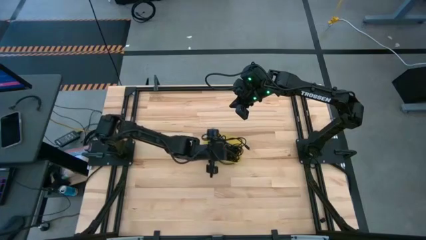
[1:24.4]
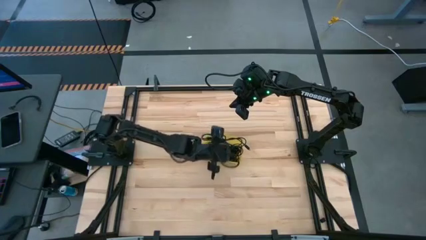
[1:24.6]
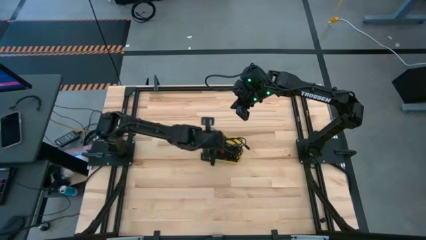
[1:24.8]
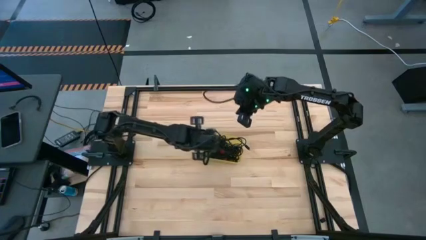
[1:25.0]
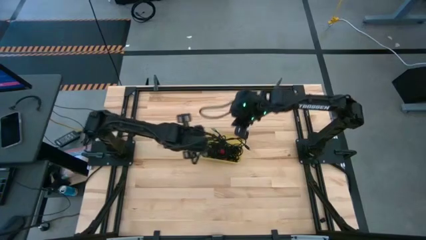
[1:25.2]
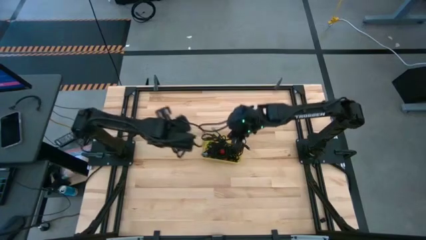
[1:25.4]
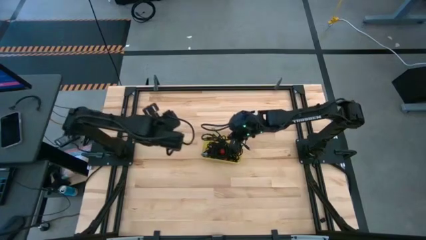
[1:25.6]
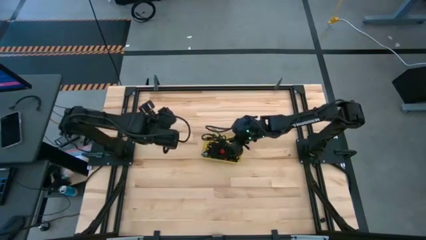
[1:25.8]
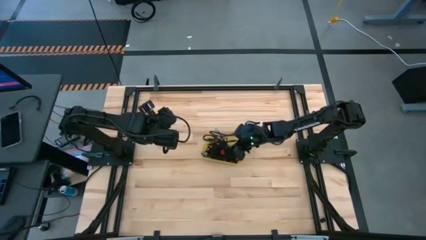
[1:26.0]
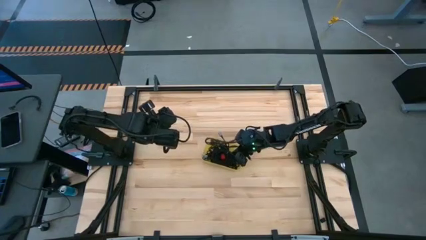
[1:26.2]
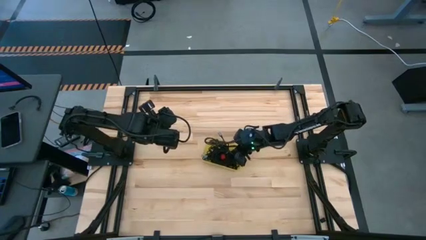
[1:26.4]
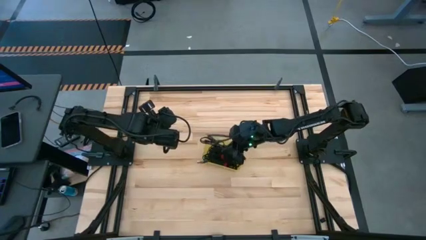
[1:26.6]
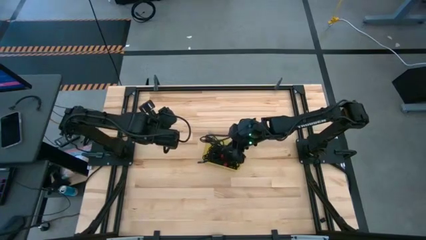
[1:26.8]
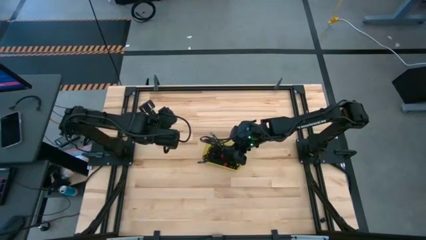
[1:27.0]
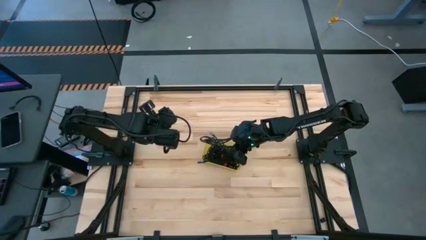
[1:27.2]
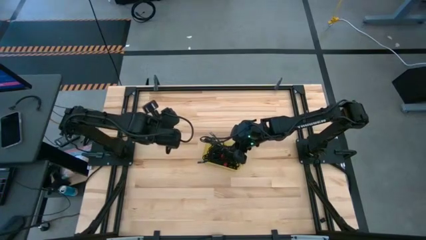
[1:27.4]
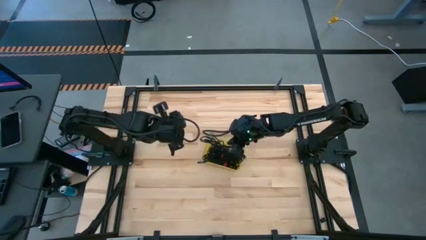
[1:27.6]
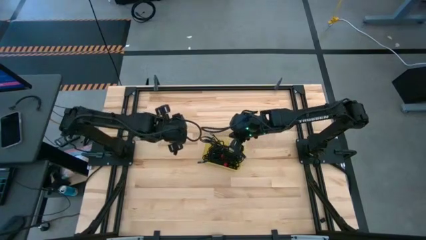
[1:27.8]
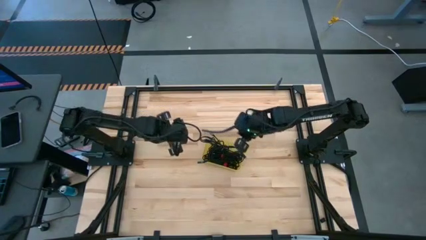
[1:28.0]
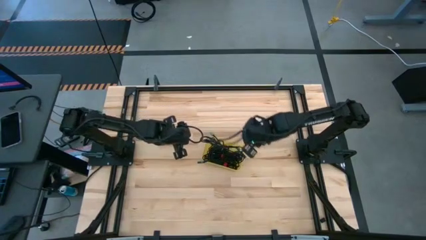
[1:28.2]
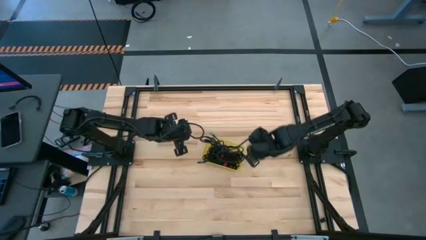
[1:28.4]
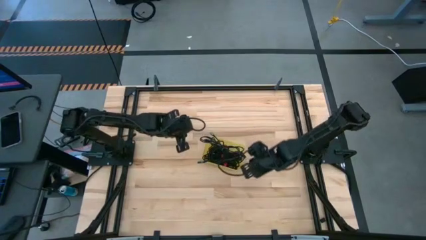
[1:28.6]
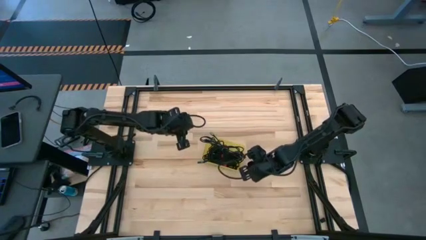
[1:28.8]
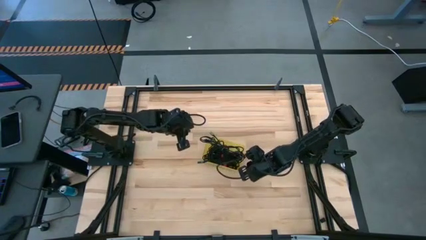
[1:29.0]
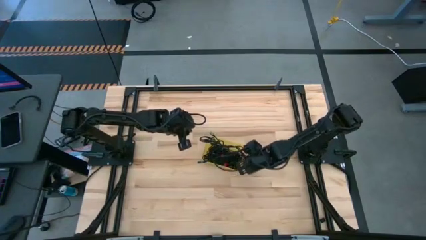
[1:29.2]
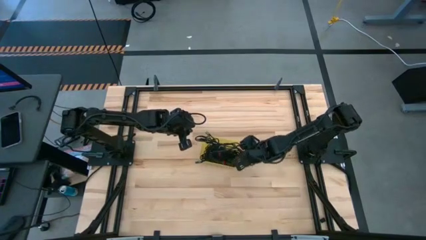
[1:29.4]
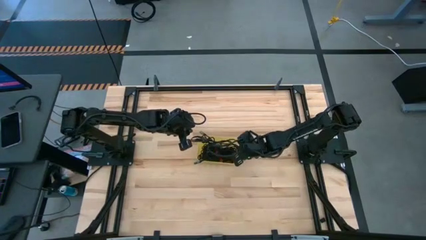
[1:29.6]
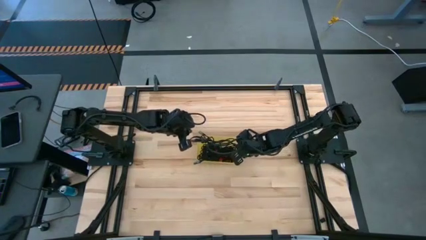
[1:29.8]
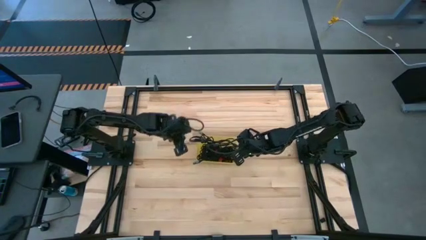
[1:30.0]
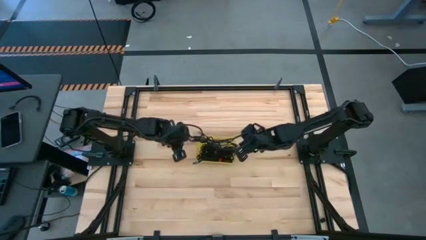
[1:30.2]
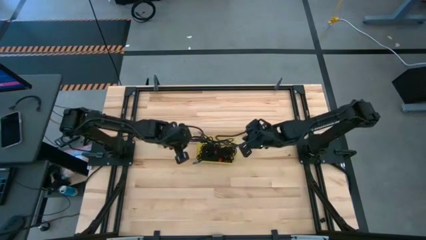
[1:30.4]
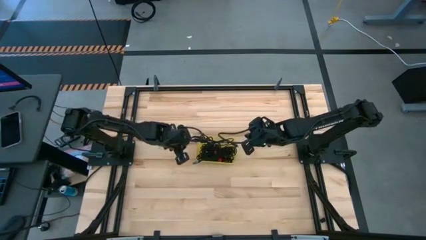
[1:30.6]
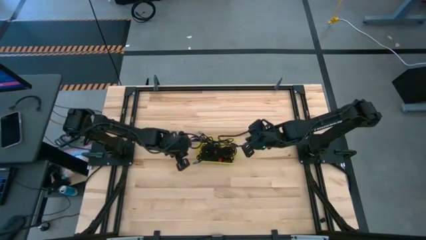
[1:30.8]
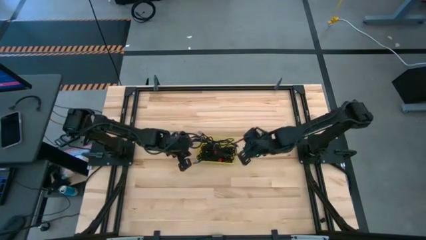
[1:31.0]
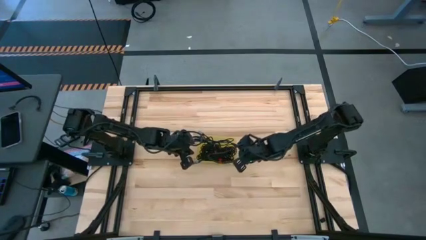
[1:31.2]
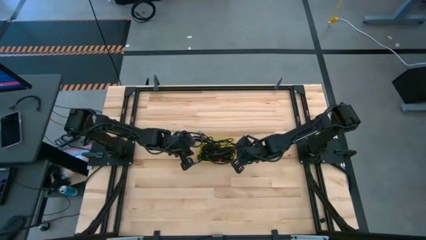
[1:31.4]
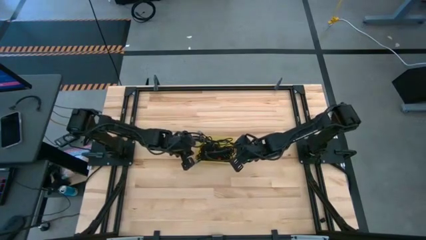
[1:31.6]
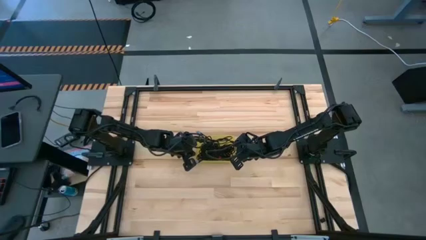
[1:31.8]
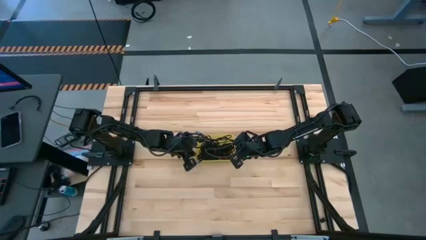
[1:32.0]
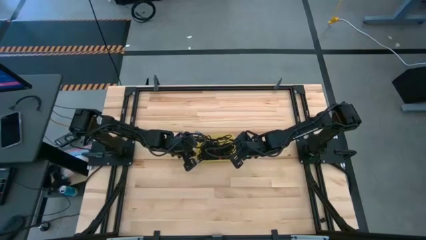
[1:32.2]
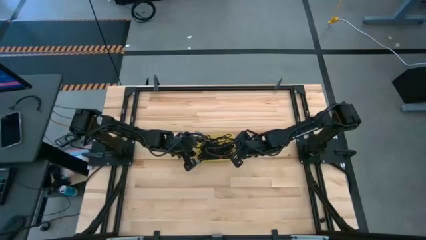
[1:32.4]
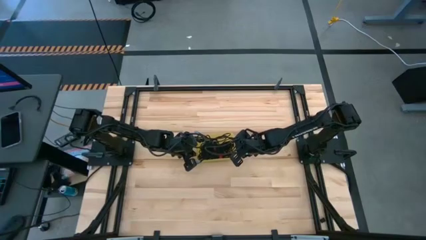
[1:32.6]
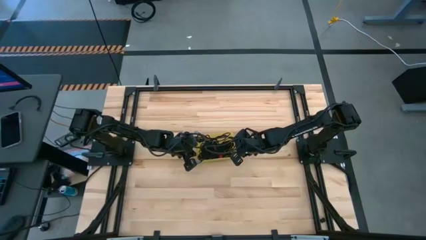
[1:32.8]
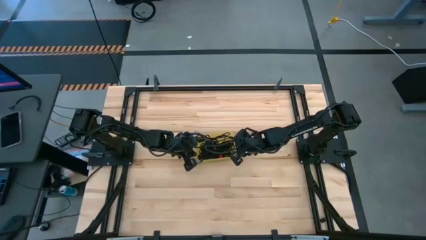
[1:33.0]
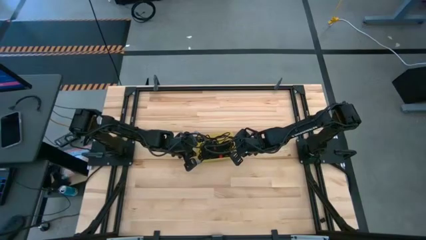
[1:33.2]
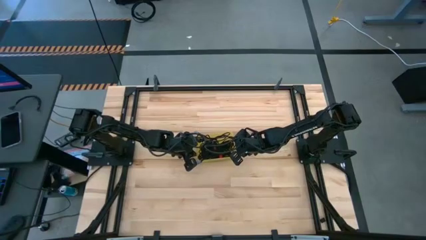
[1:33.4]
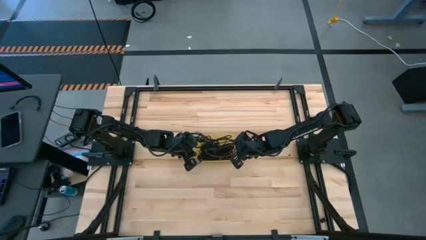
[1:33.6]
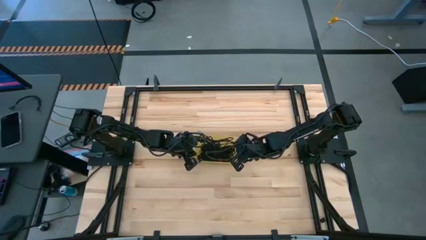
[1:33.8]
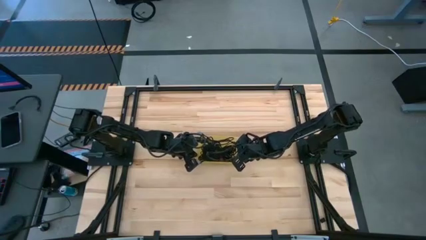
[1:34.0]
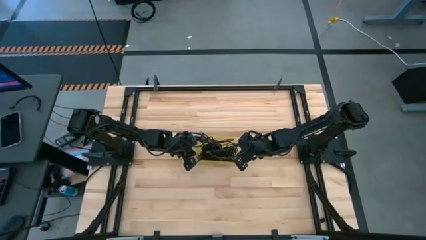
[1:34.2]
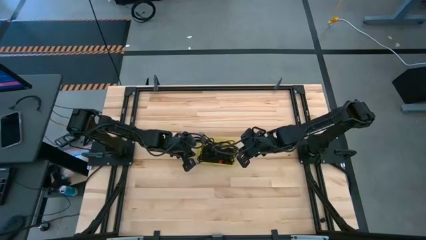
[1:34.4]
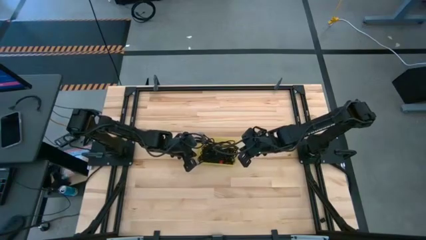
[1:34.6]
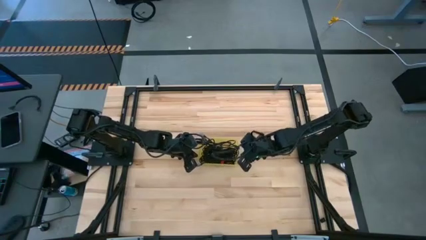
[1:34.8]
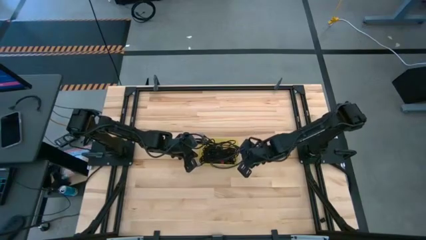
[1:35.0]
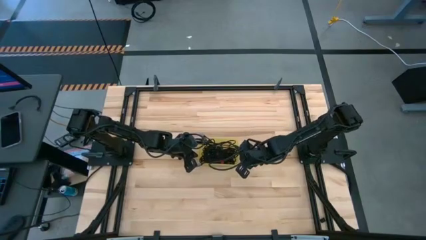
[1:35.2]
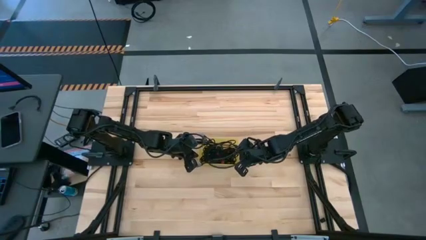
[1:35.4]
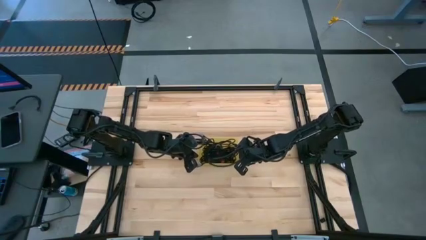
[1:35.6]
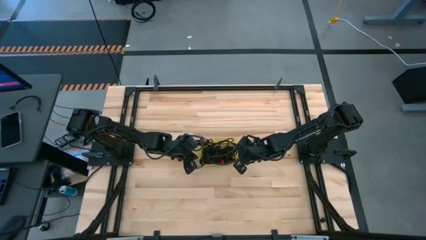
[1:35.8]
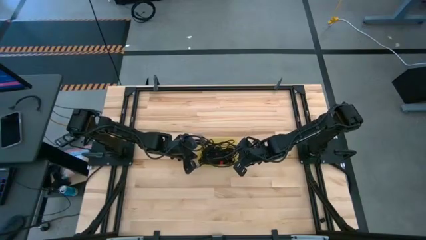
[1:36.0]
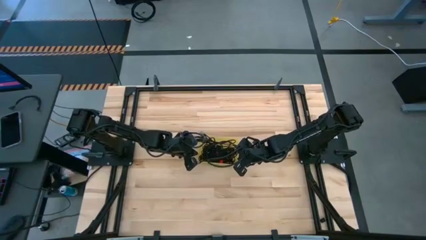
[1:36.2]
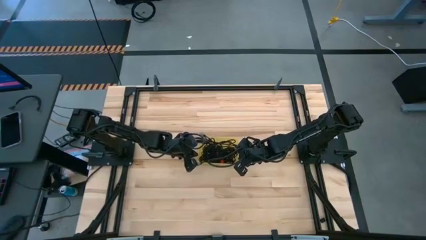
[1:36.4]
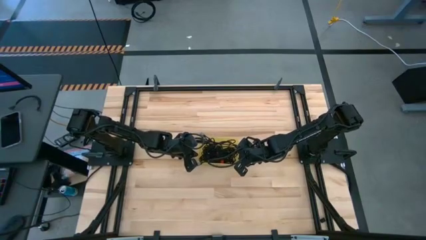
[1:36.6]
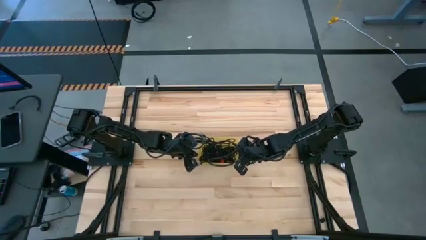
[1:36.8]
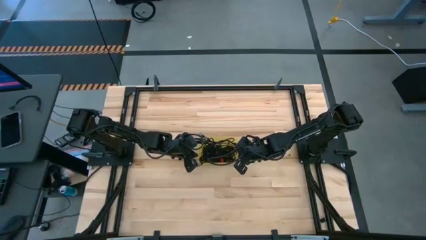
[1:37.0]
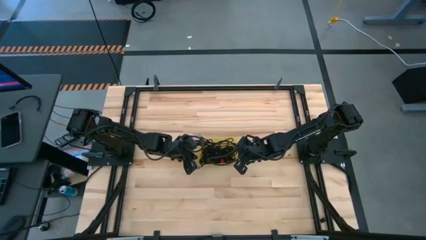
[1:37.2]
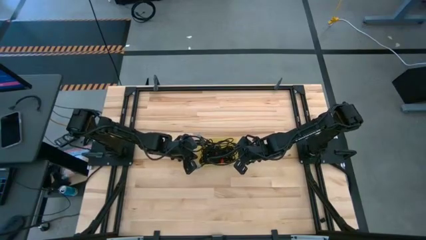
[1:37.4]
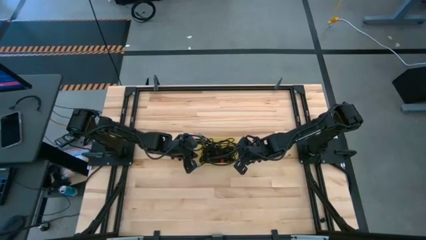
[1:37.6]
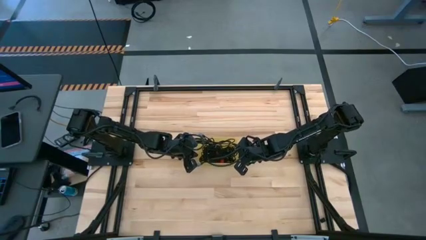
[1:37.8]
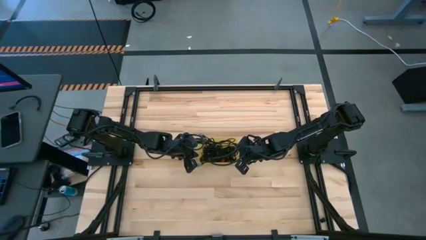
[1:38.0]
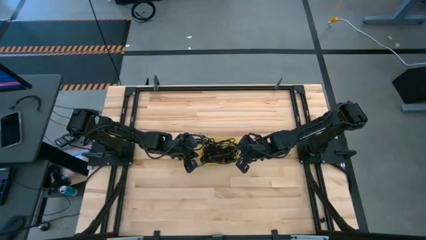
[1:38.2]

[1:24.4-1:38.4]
Task: Pick and place USB-C Cables
Adjust the yellow bin
